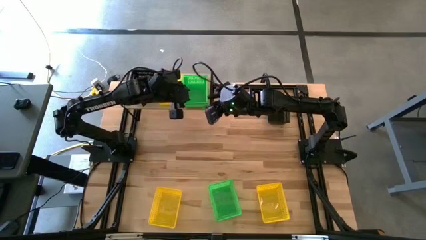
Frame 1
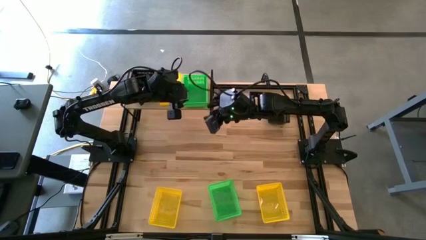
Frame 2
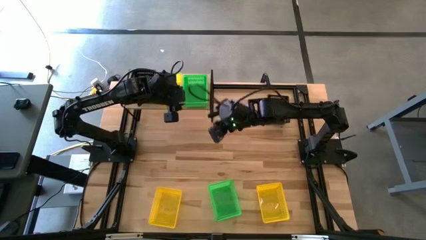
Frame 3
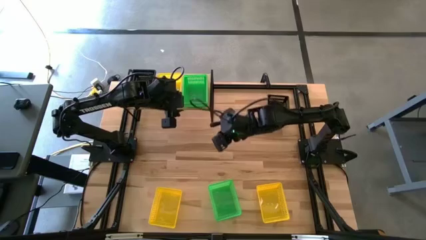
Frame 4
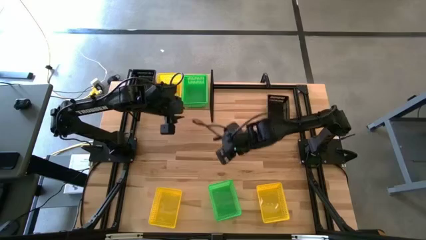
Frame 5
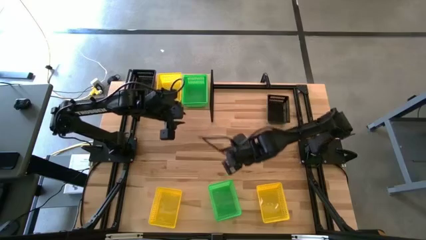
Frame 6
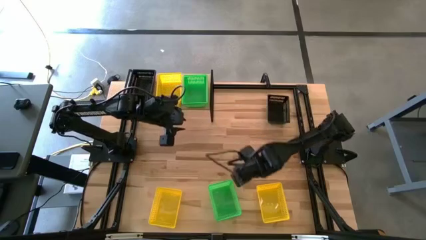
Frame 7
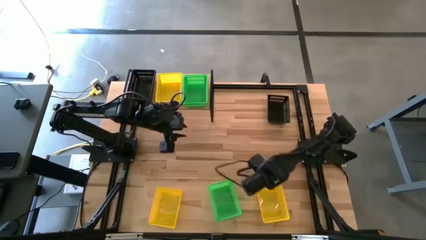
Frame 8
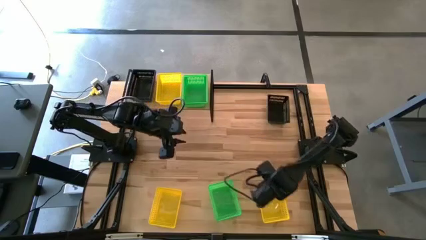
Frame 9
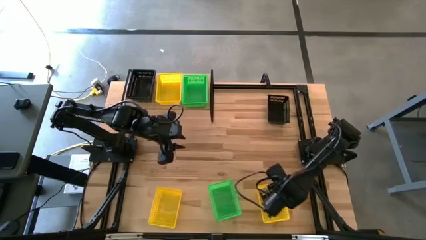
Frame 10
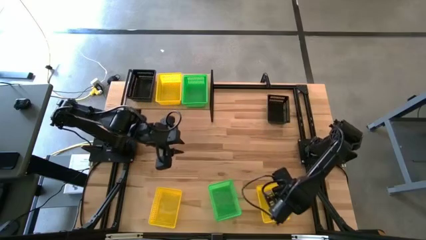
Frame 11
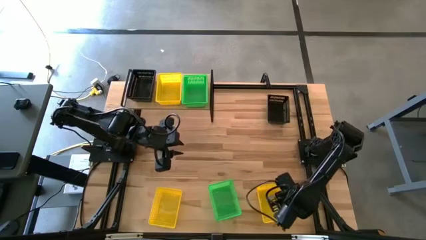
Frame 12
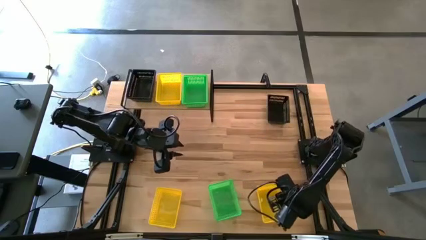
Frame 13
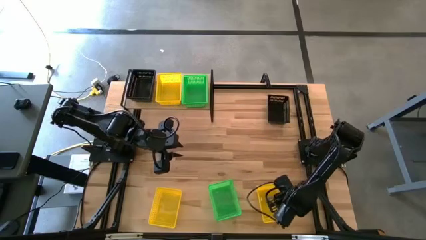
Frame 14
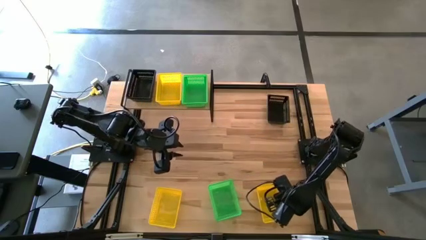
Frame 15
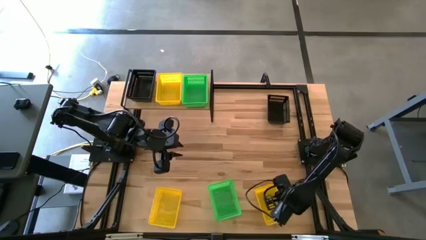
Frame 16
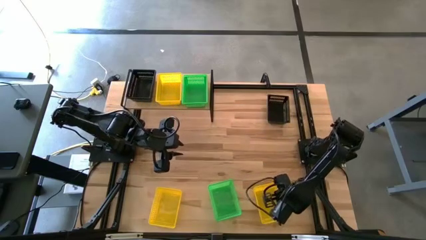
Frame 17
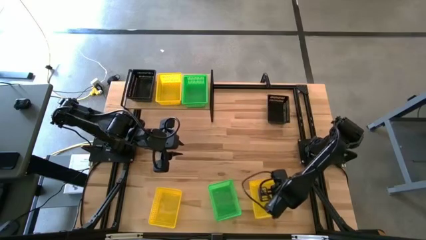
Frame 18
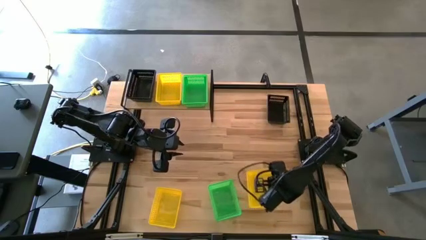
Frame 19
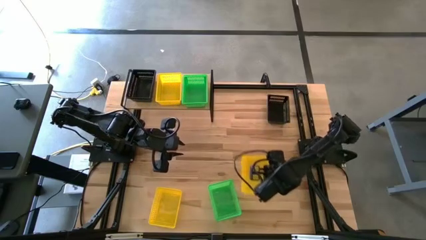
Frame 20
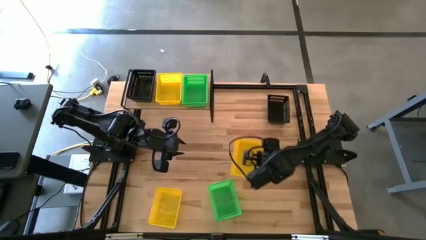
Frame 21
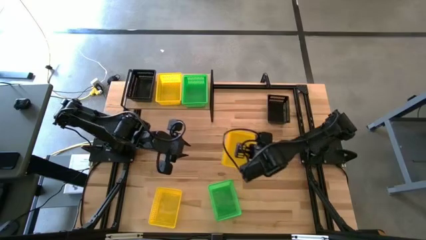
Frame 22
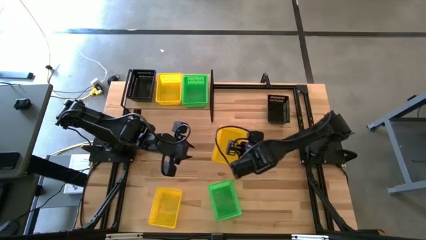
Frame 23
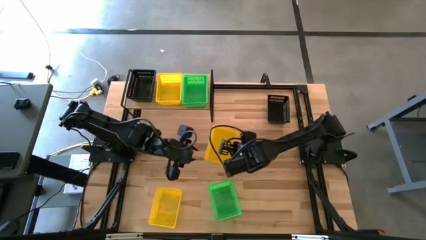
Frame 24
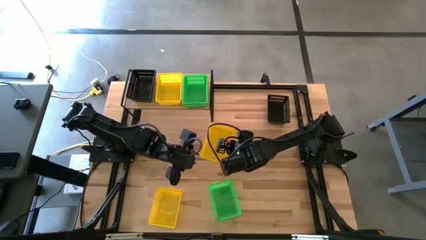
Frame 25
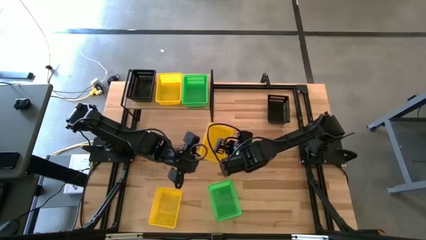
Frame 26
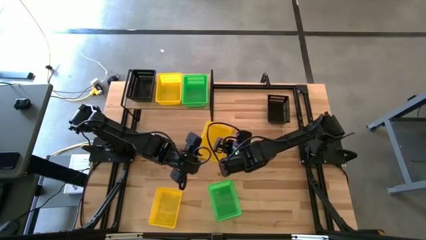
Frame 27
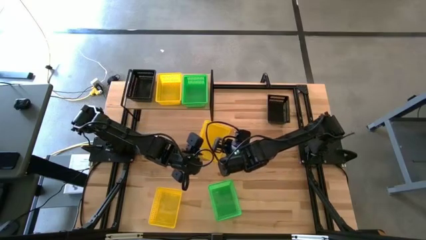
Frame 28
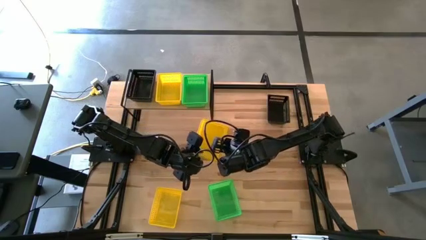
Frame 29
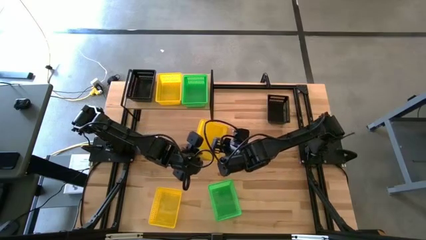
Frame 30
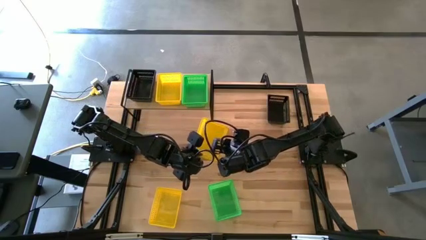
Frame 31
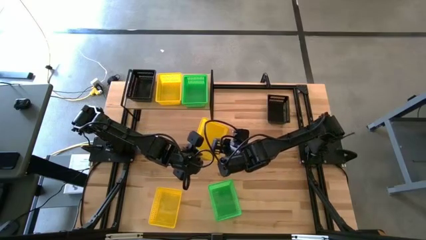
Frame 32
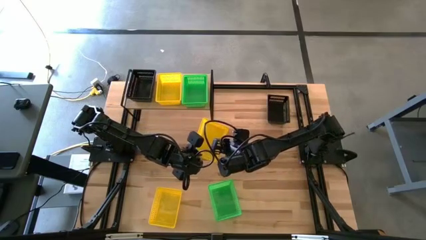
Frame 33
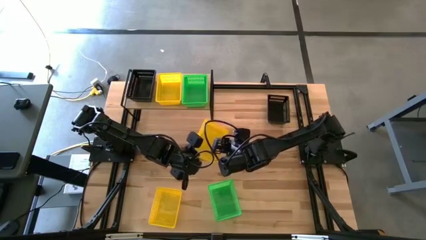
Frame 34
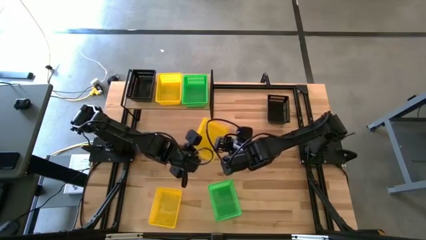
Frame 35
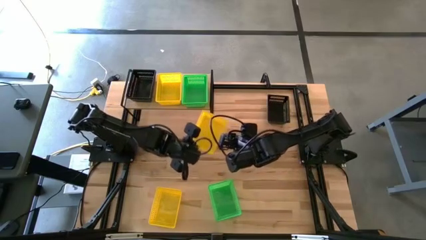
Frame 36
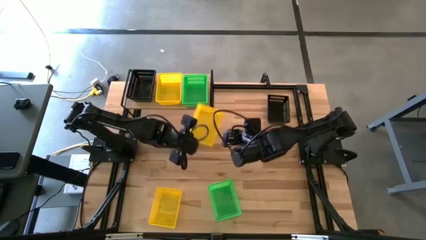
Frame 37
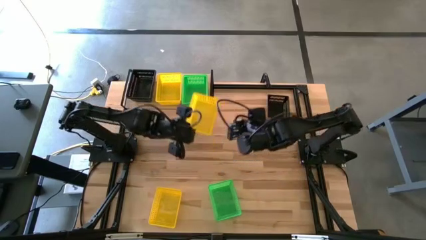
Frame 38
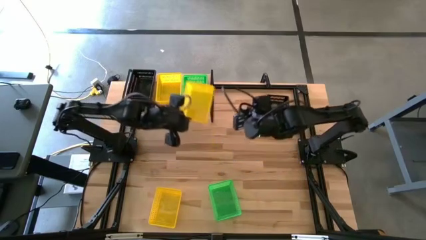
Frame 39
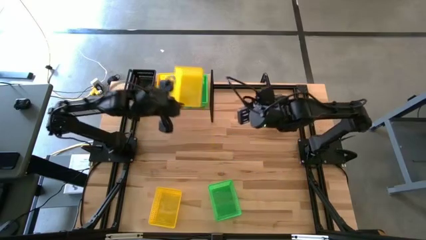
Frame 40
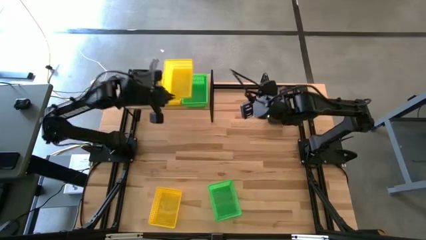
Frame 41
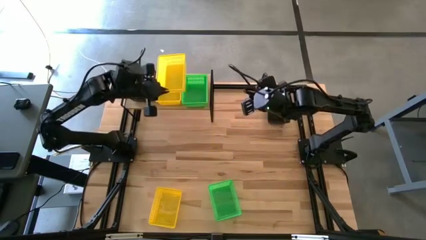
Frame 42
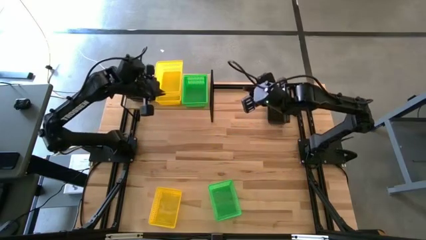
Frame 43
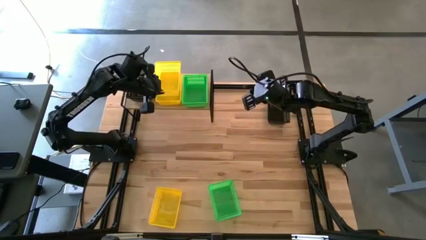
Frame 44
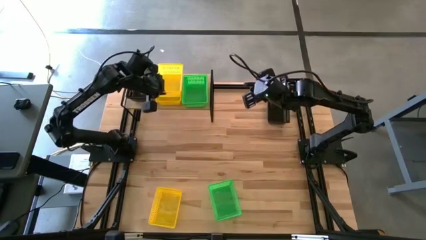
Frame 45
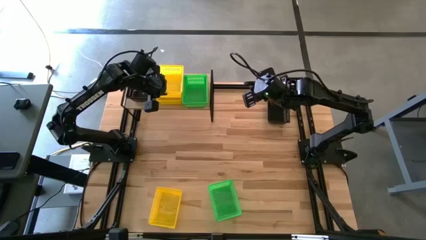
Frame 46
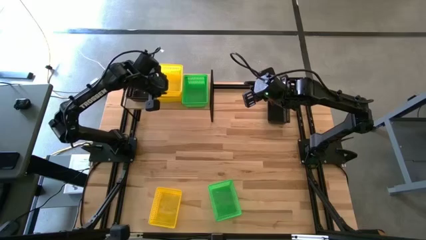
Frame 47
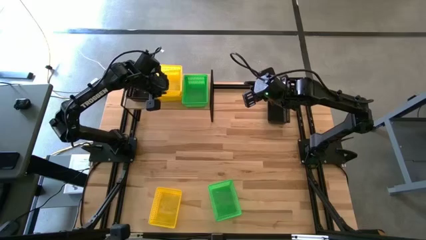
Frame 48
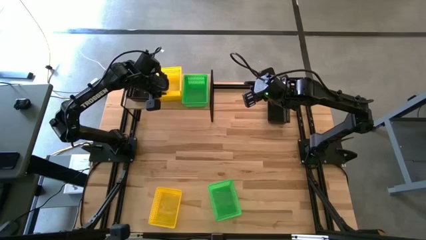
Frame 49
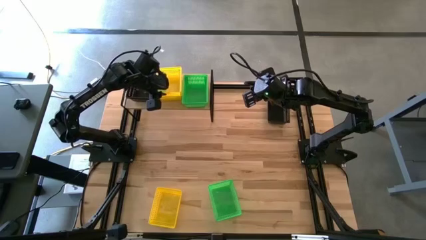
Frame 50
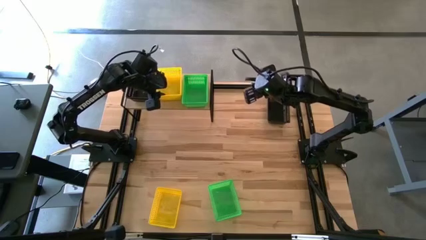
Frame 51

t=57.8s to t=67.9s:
Task: Stack baskets on shelf by color
Stack the right yellow basket on top of yellow basket on the shelf

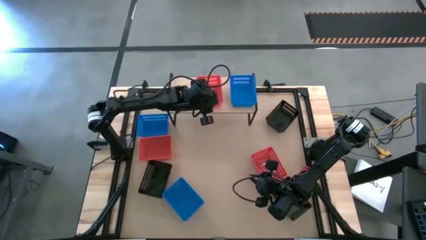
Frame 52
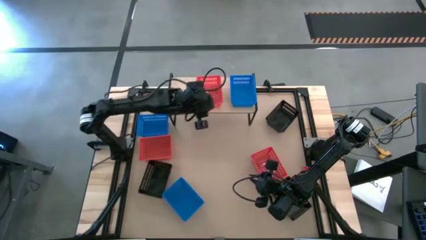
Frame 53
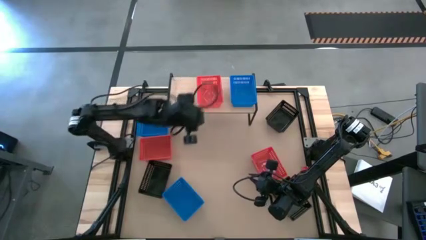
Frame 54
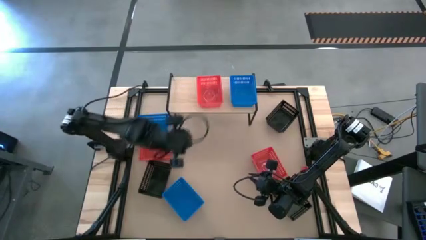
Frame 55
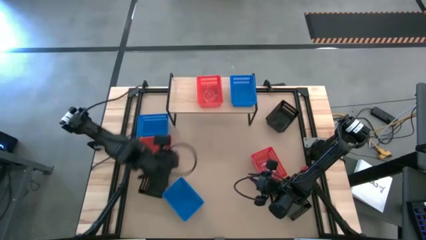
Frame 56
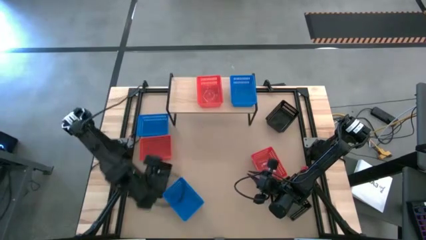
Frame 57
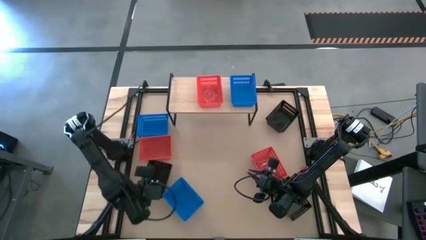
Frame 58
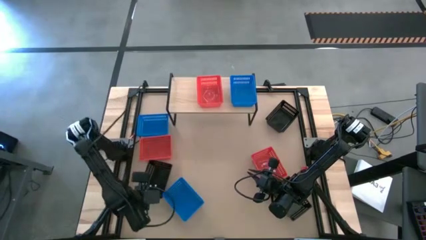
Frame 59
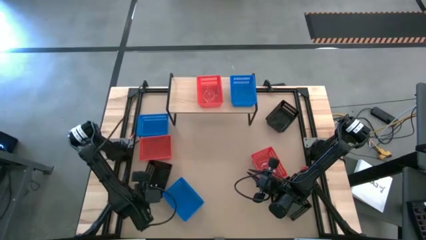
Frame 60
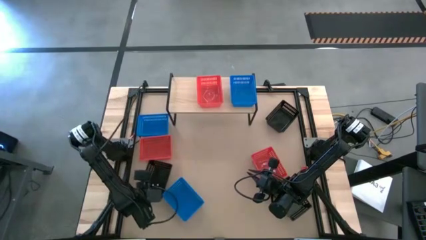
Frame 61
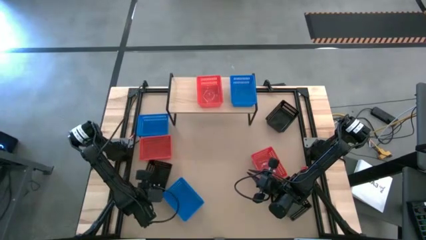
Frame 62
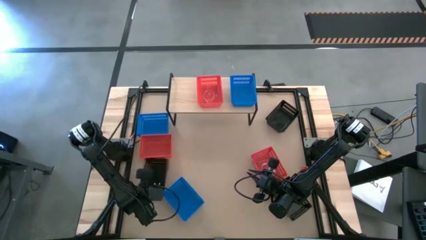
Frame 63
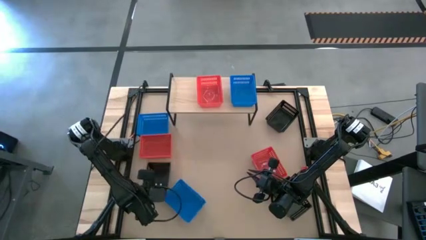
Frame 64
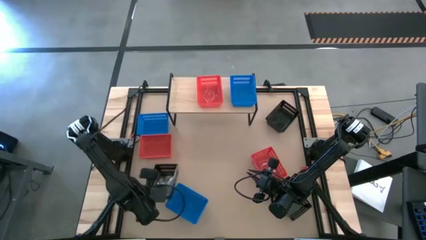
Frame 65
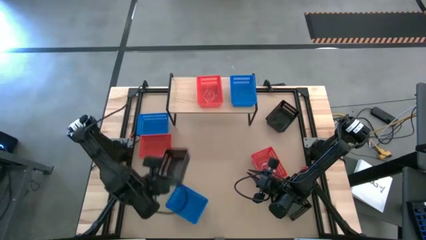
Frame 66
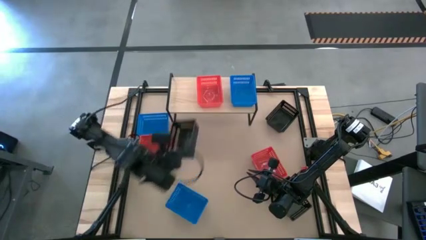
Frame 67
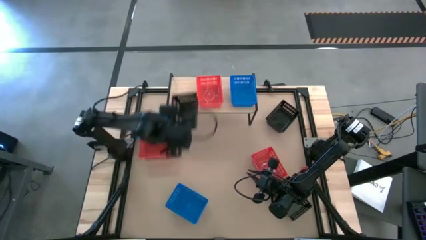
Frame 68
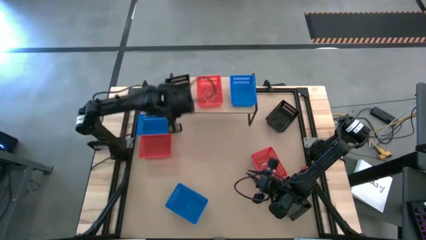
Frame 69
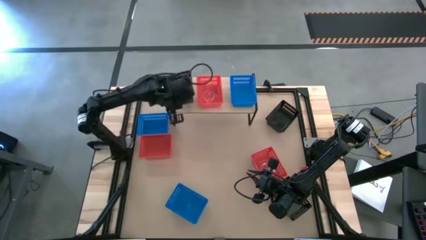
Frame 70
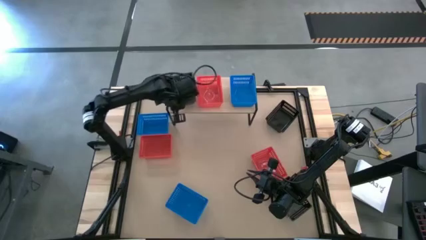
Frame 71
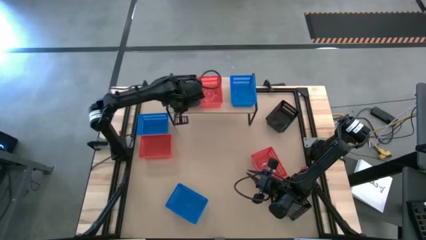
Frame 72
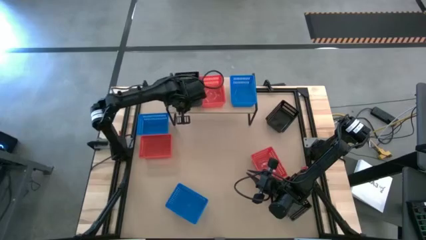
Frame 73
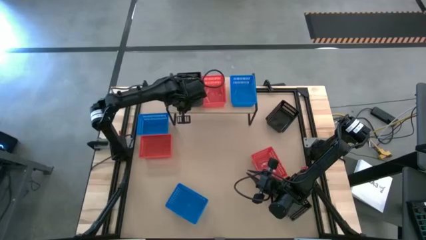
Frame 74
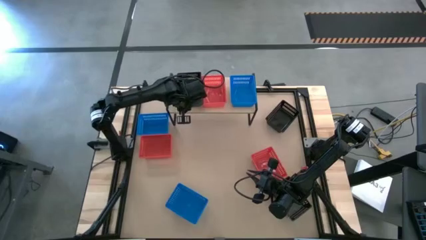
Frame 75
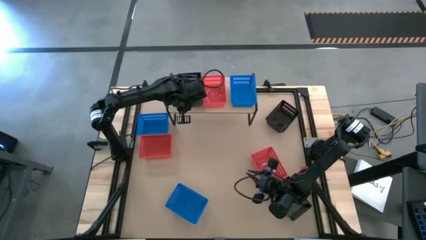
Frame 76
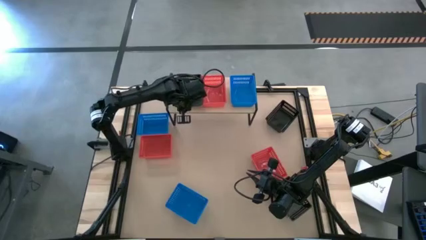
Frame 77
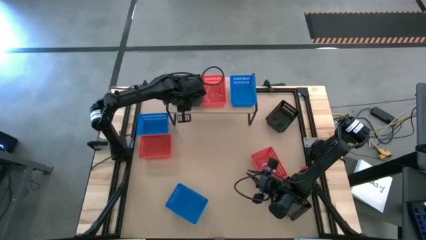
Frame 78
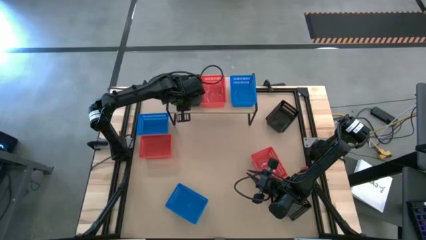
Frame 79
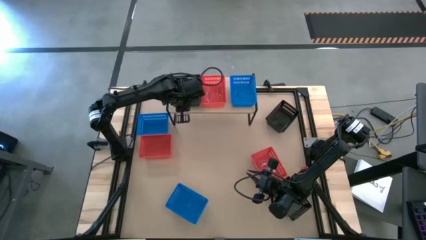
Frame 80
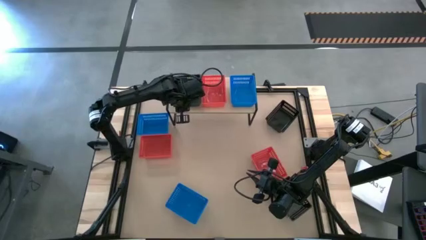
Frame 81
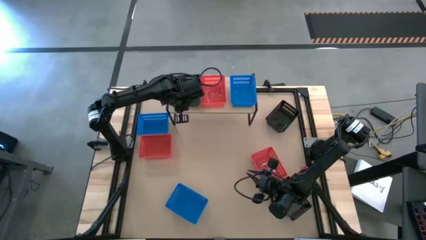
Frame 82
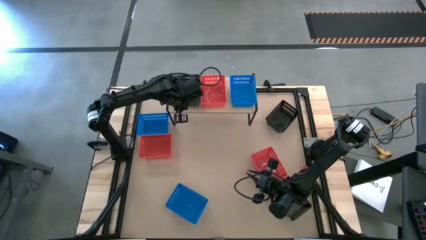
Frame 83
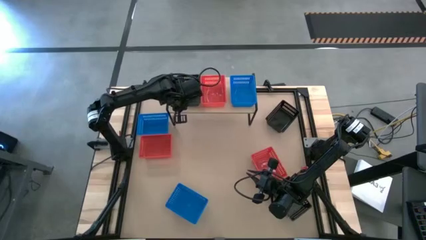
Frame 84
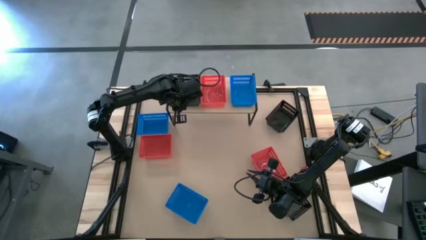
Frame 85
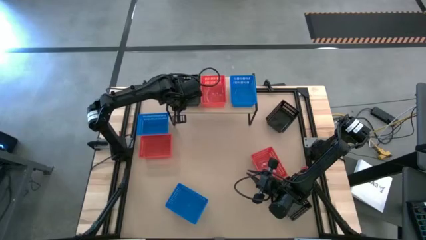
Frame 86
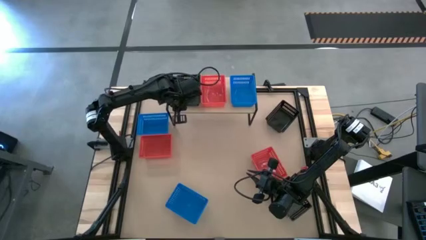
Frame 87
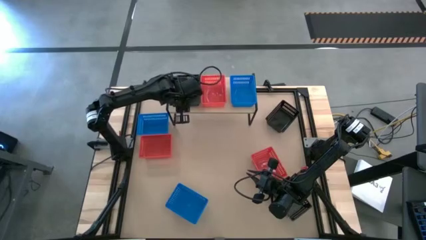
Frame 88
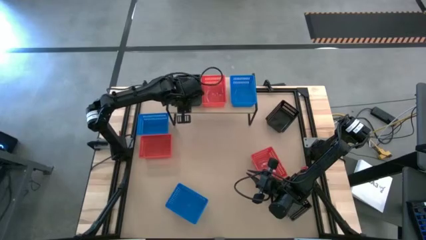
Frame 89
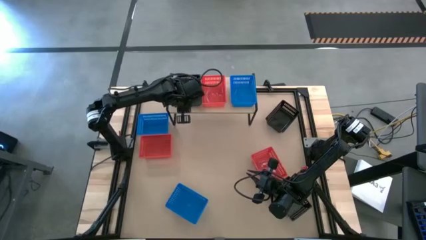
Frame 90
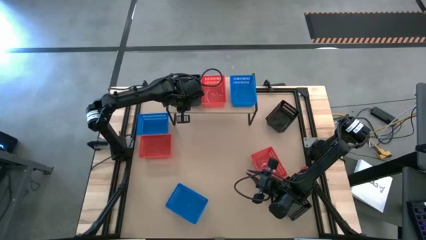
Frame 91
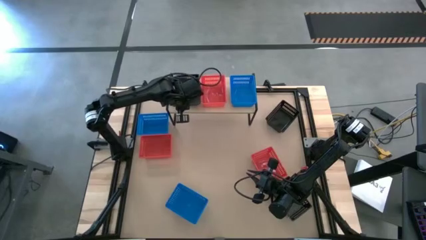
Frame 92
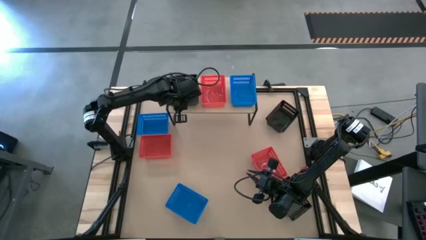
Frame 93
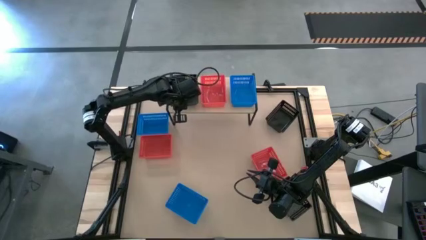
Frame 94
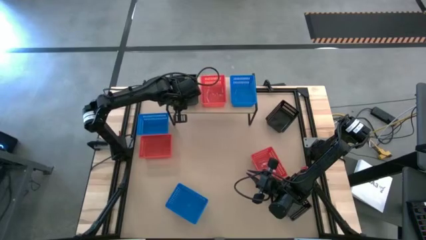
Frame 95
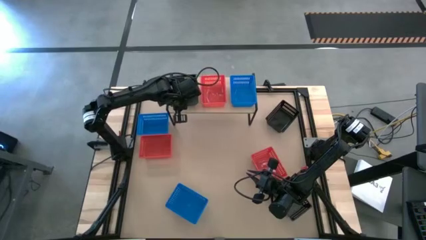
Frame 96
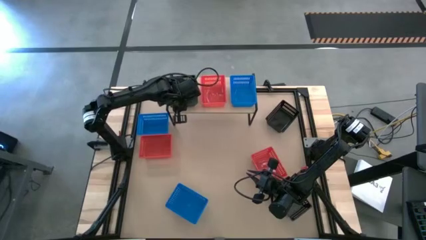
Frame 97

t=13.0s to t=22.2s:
Task: Stack baskets on shelf by color
Put the bottom left black bin on the shelf
